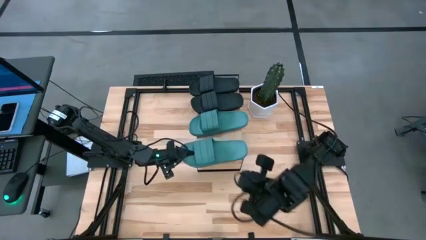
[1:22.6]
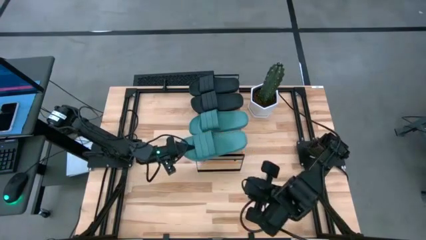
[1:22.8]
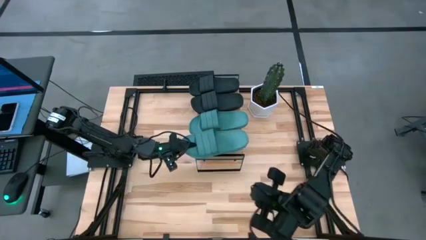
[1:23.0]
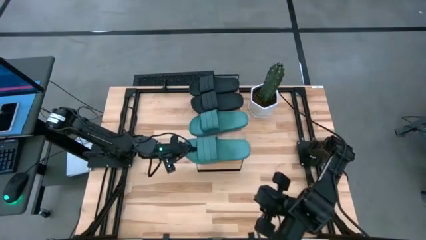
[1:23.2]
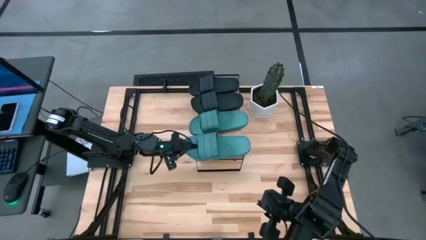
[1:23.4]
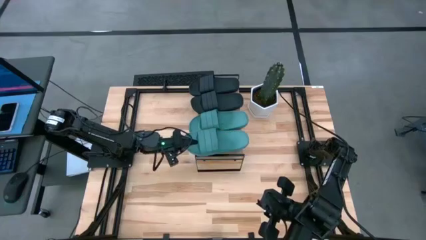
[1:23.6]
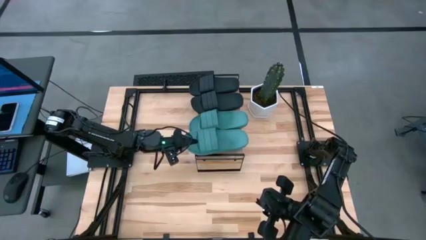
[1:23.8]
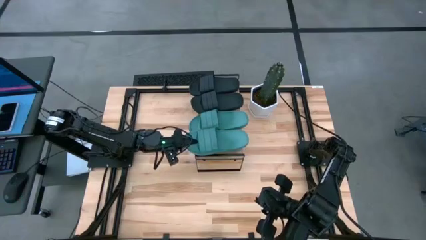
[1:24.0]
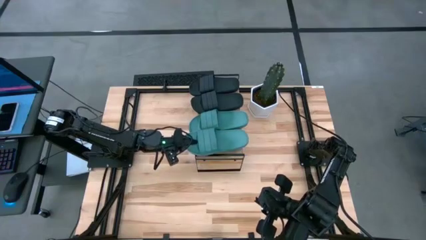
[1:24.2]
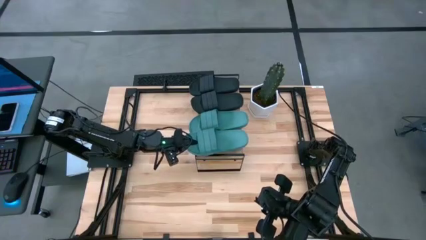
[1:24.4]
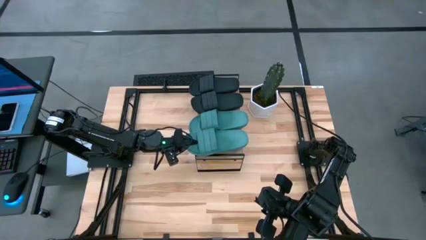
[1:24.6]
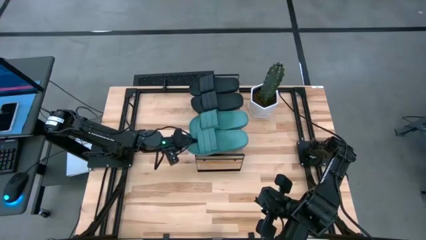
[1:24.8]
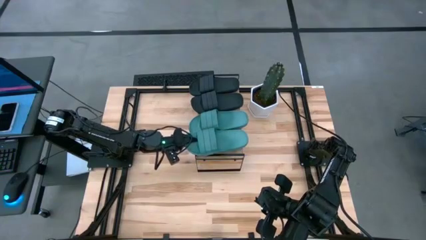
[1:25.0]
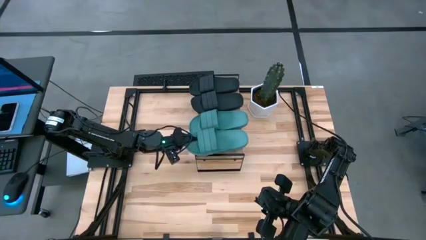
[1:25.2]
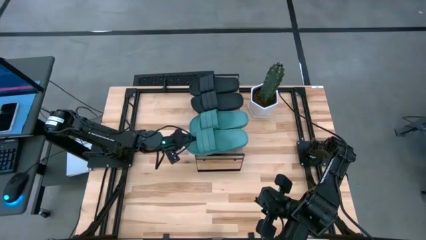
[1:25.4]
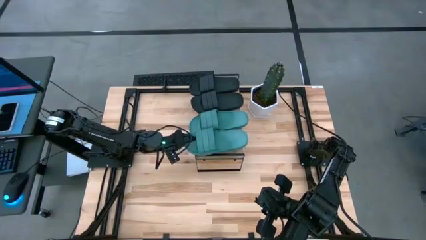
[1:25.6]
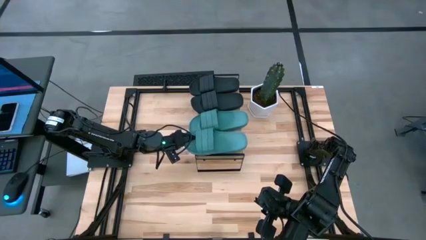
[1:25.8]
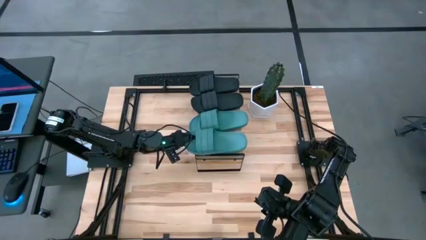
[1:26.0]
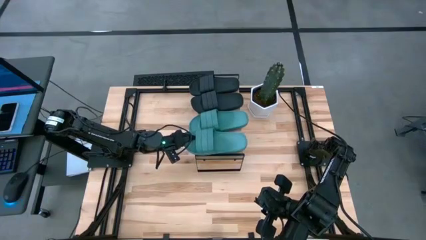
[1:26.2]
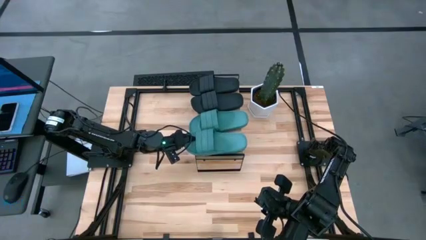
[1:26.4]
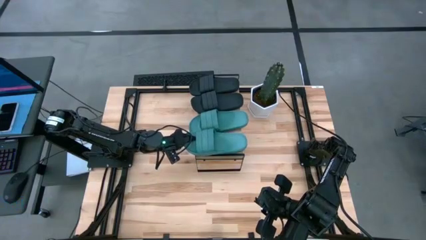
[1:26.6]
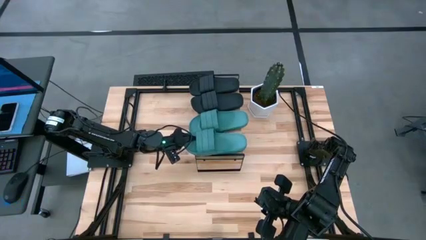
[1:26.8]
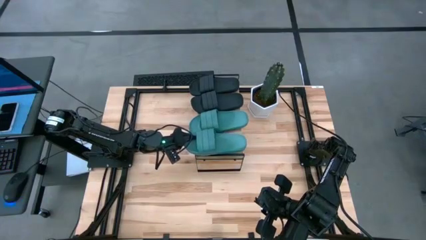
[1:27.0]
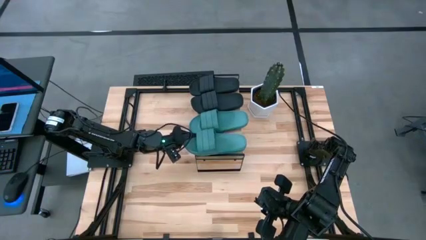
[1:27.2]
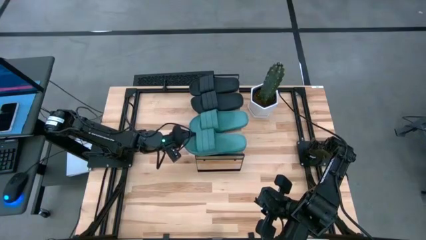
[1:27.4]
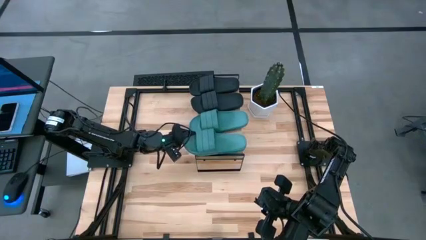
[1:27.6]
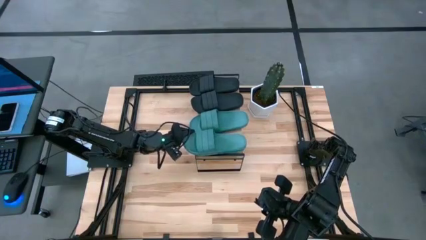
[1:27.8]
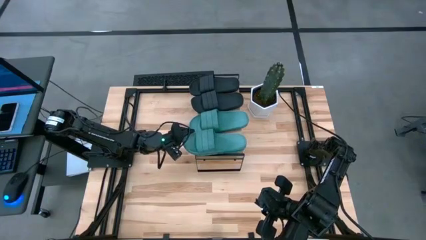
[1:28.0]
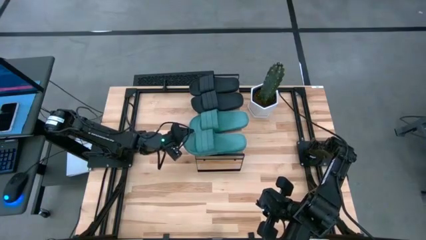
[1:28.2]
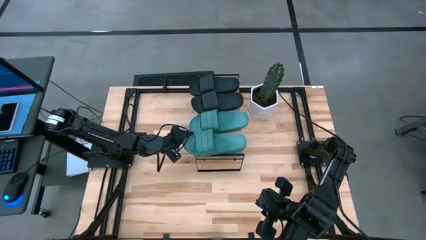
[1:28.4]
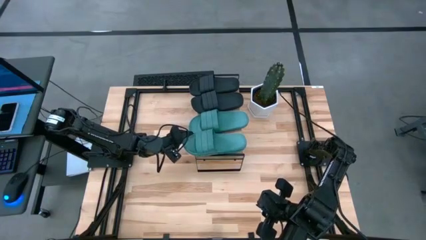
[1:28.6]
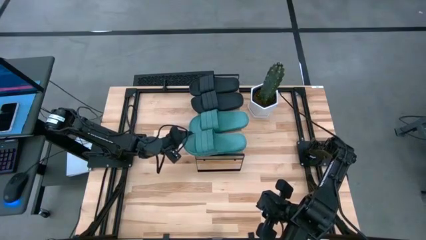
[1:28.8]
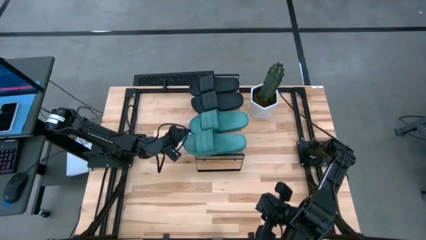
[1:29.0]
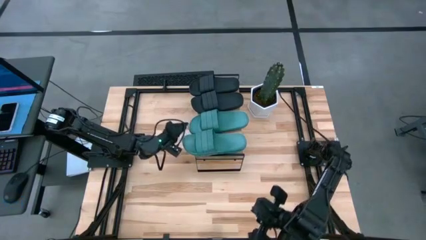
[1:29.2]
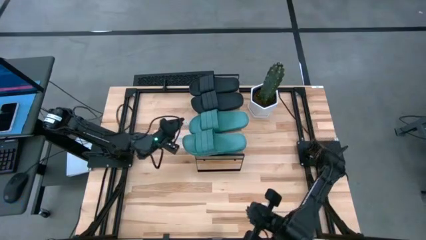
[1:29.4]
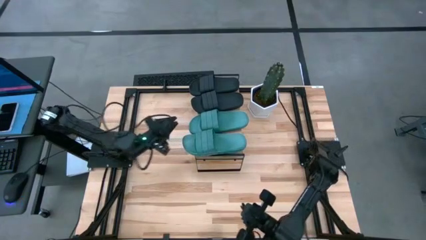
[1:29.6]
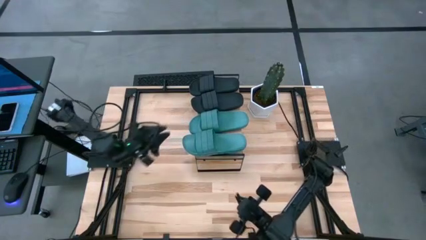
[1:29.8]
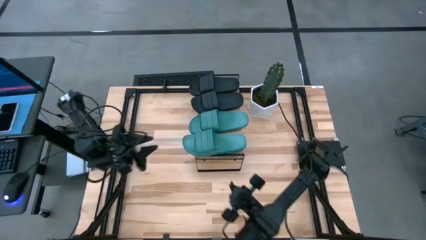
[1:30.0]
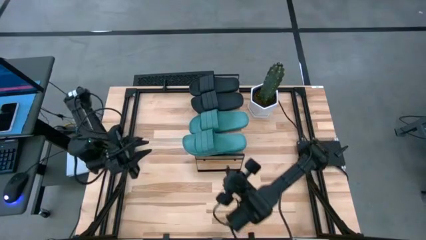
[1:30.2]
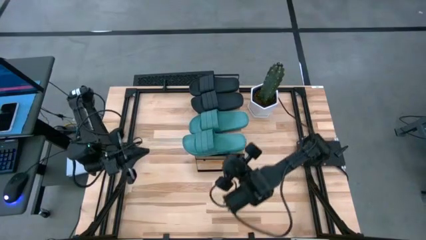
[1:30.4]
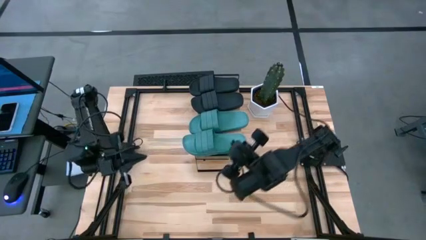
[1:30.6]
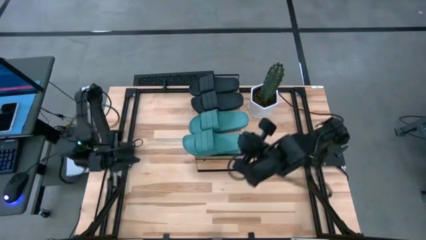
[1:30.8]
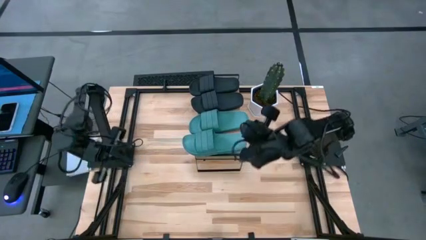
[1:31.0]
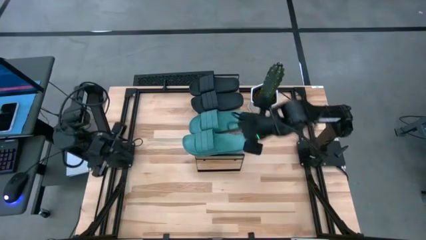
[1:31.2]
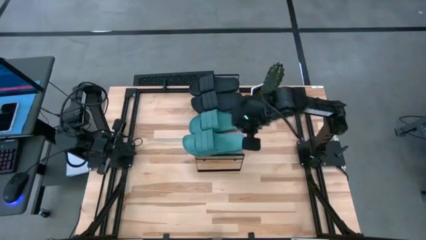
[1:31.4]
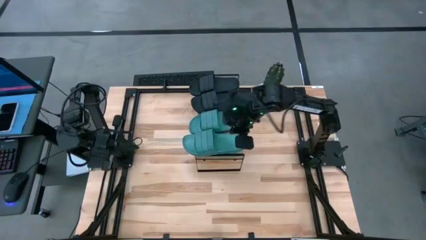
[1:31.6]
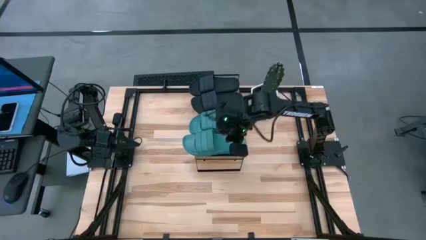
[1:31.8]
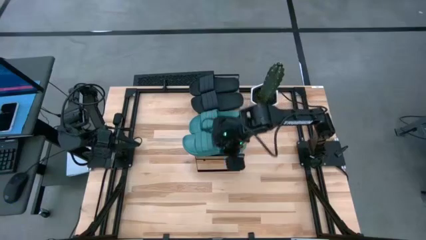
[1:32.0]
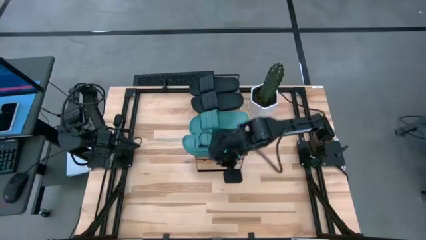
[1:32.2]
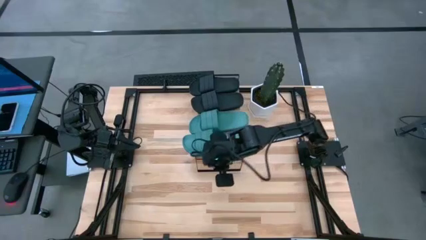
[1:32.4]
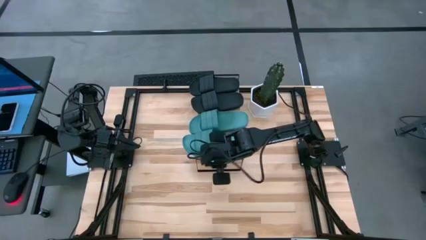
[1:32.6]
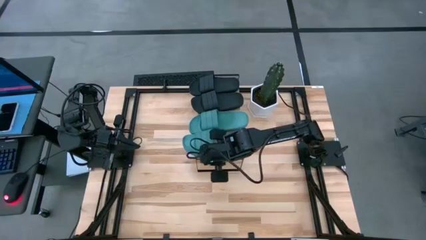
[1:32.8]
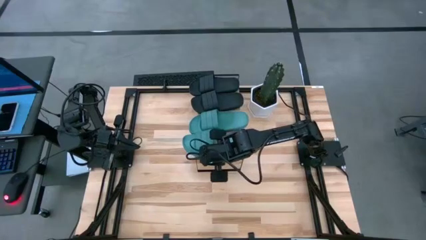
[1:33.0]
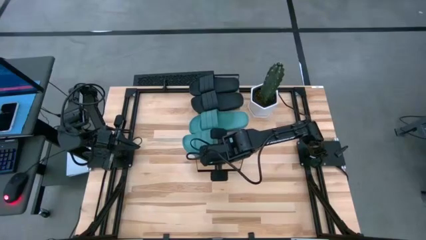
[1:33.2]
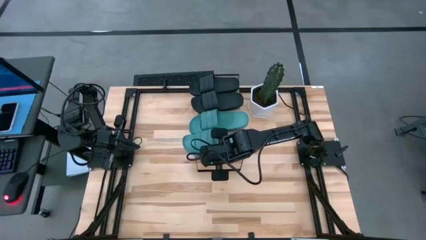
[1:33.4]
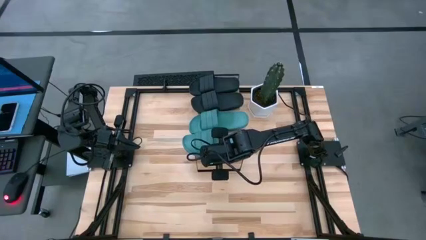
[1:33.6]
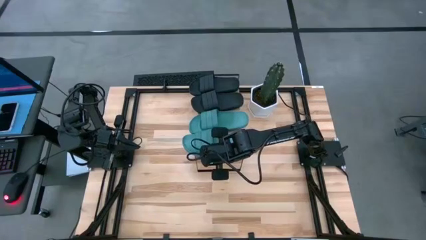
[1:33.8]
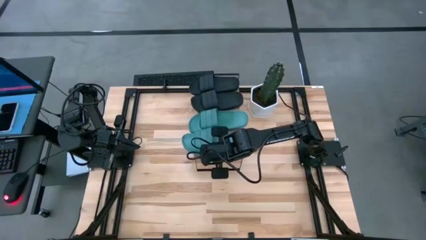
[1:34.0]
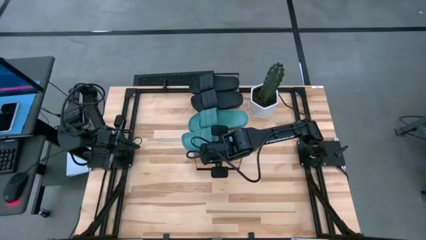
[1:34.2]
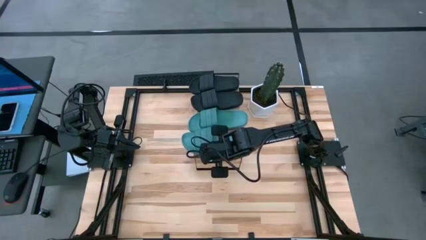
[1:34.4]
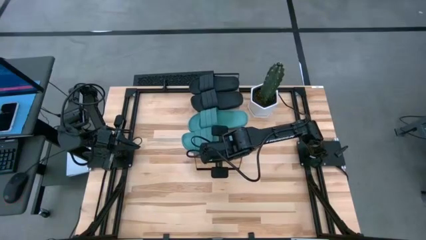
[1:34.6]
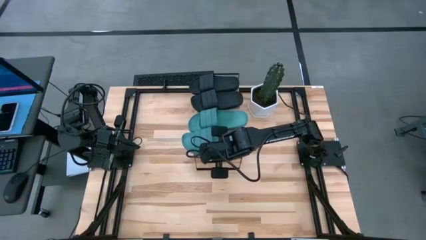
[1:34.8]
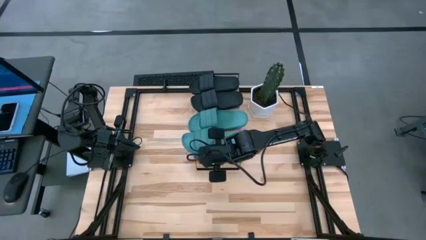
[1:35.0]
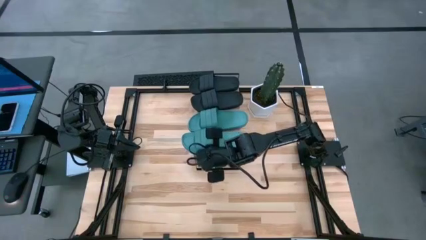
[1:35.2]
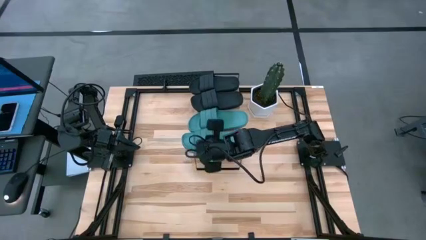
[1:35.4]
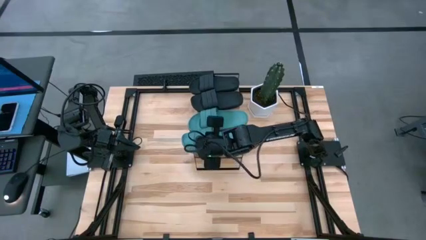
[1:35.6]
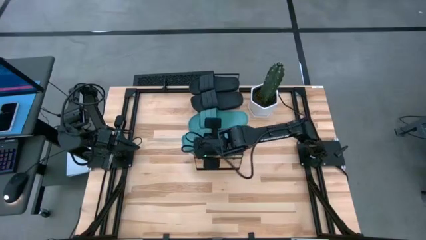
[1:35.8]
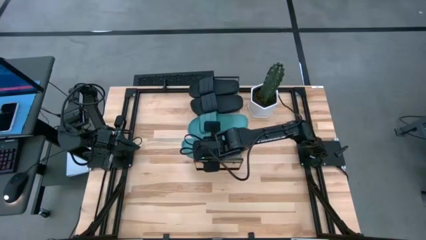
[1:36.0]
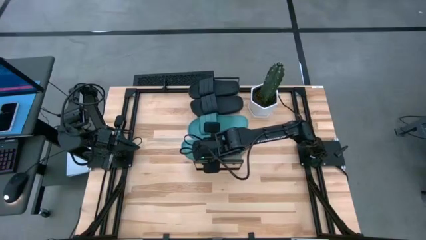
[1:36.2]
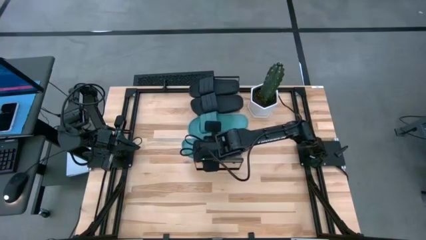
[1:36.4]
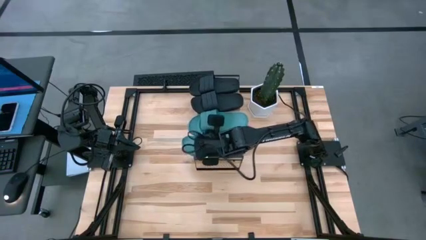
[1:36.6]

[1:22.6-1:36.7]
Task: Pick and place slides into the shelf
Put the green slipper on the shelf

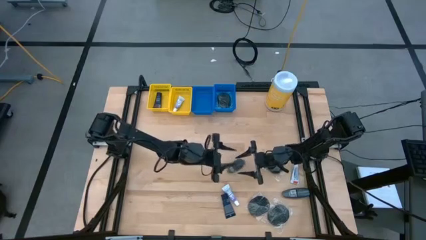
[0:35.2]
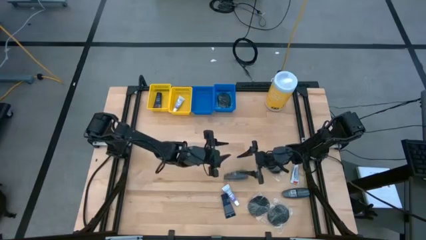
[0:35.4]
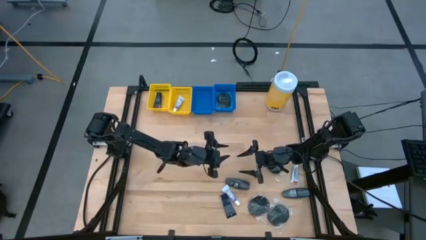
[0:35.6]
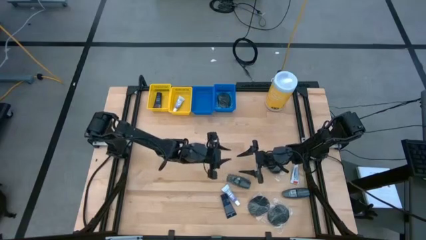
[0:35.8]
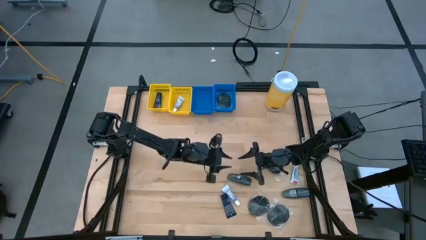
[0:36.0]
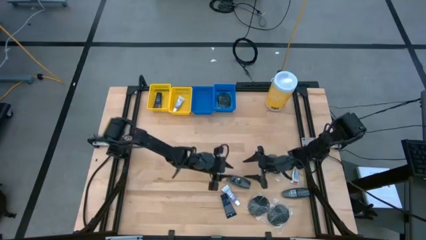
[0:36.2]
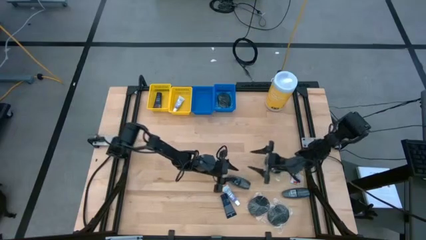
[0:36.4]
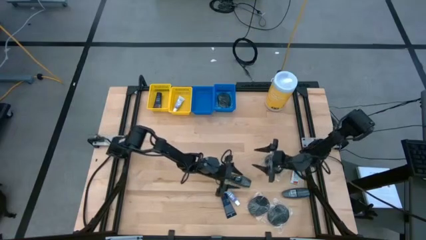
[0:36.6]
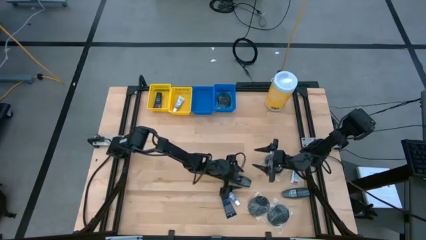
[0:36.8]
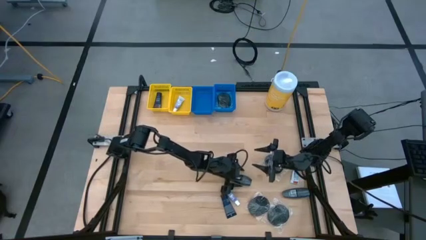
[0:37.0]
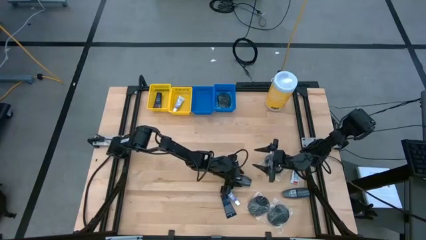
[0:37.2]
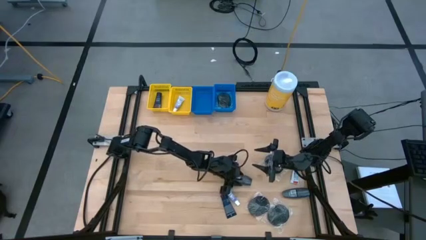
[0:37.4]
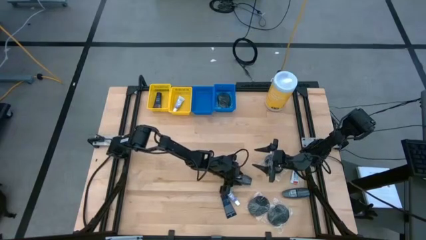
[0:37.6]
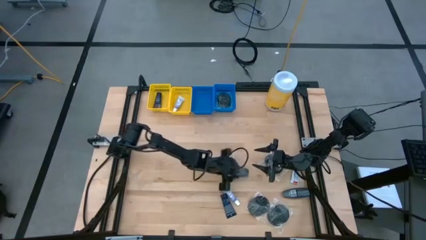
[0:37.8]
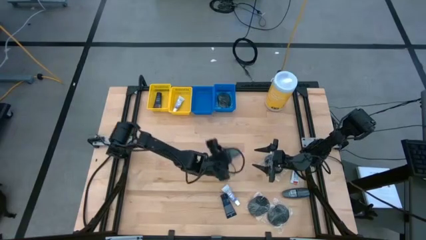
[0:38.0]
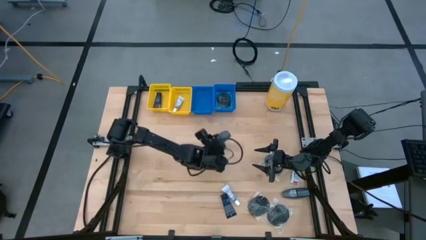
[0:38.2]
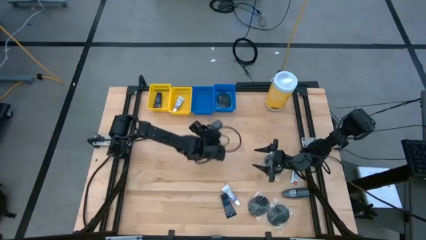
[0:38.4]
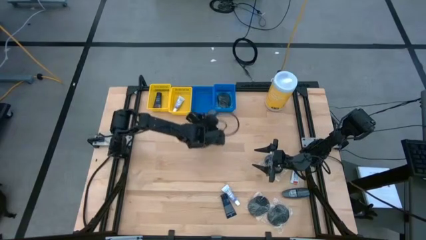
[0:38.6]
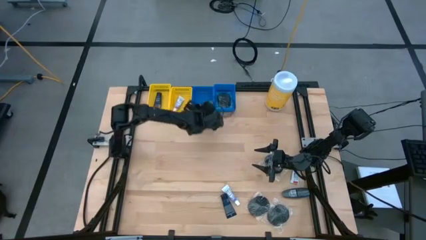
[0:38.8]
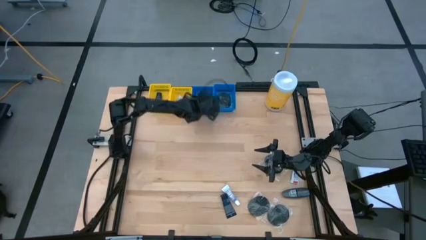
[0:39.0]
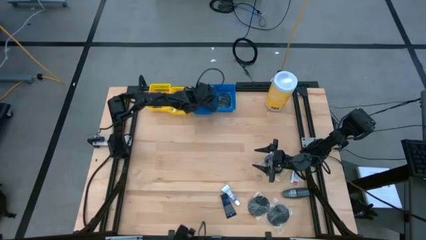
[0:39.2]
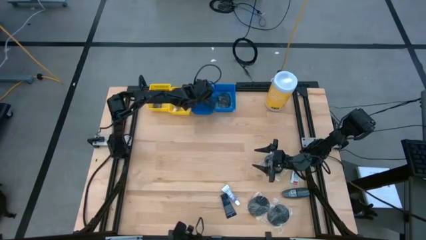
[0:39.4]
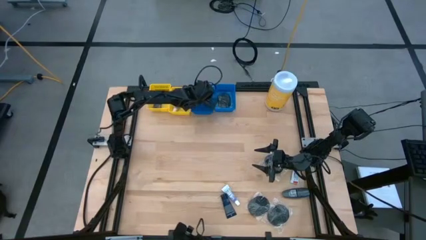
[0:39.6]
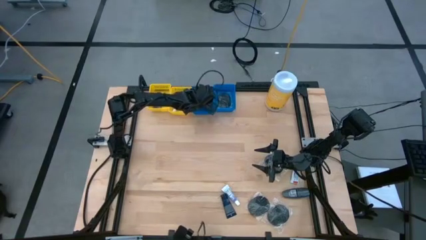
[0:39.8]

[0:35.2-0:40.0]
Task: Pick & Place Travel size toiletries
Put the black roll-on deodorant into the left blue bin
